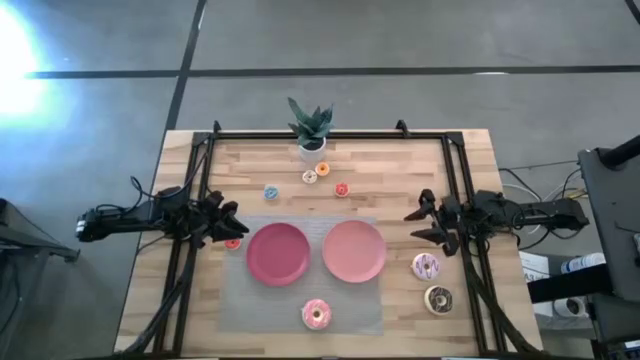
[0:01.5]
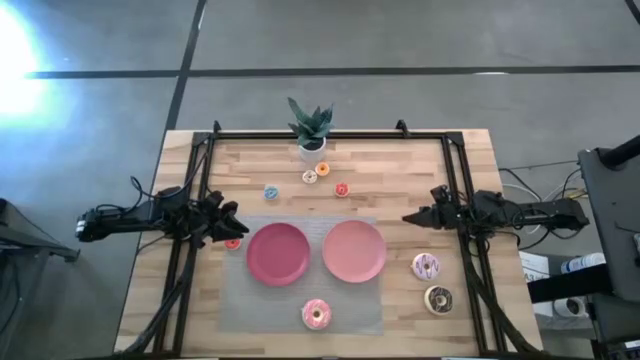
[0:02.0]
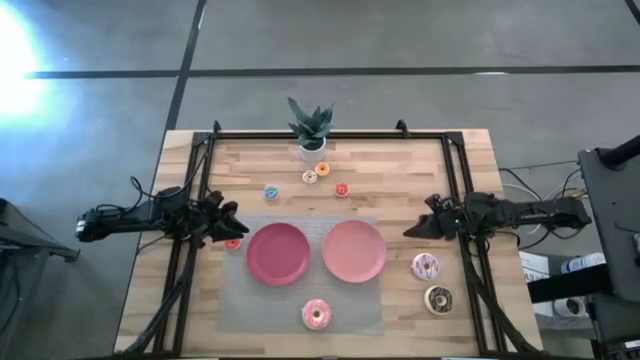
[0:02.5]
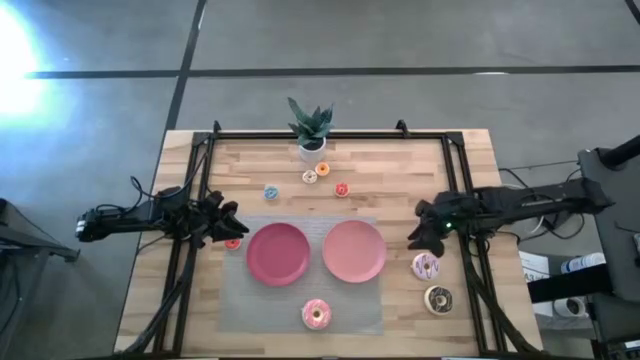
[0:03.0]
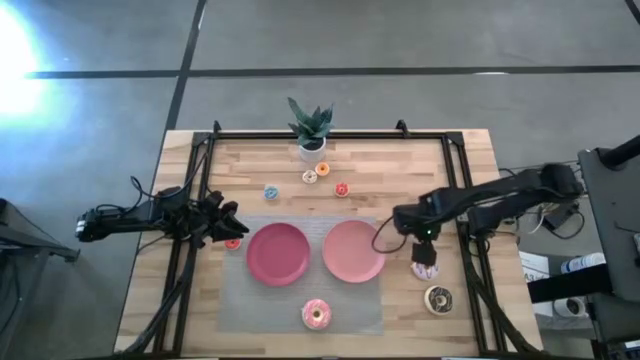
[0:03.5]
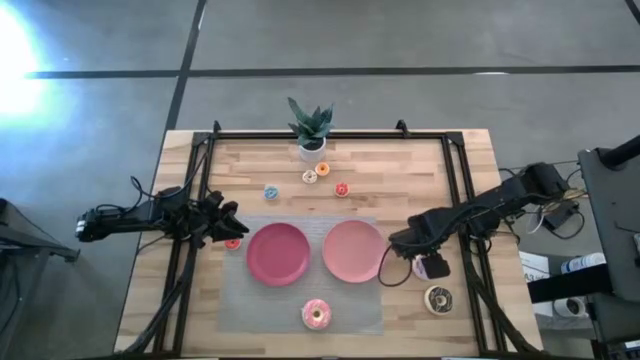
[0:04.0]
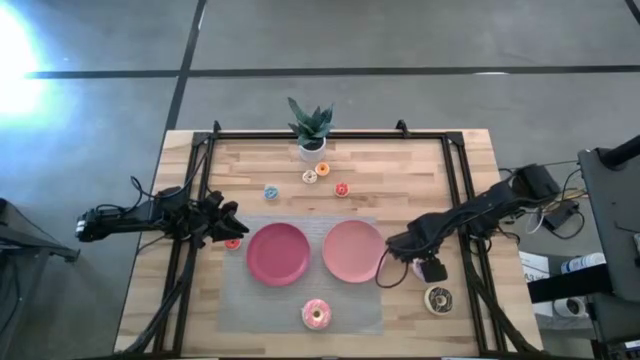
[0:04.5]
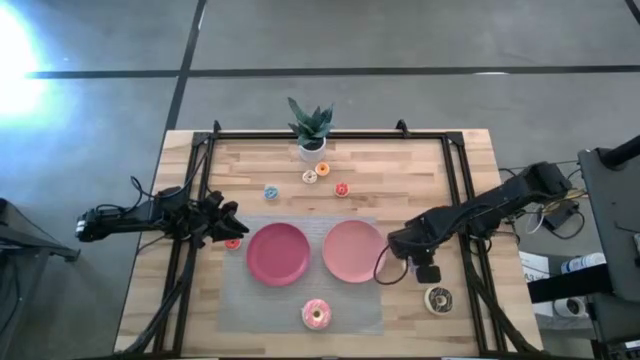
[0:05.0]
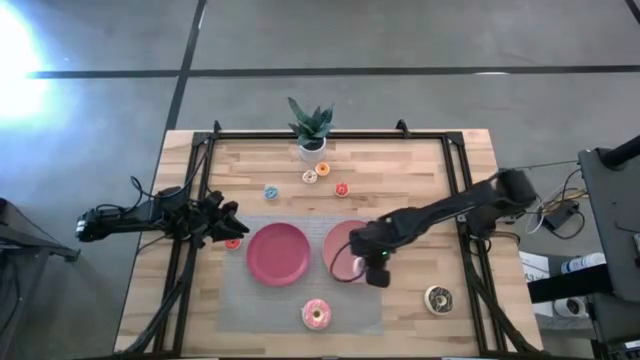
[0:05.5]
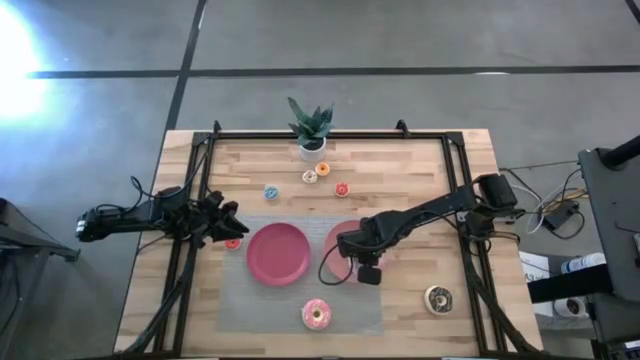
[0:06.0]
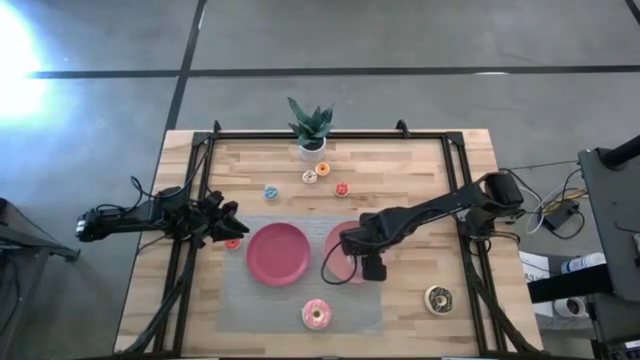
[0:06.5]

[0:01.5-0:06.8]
Task: Pick & Place donuts
Put the big purple donut on the light pink plate

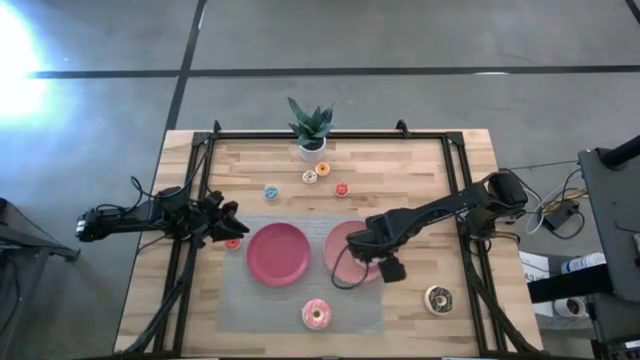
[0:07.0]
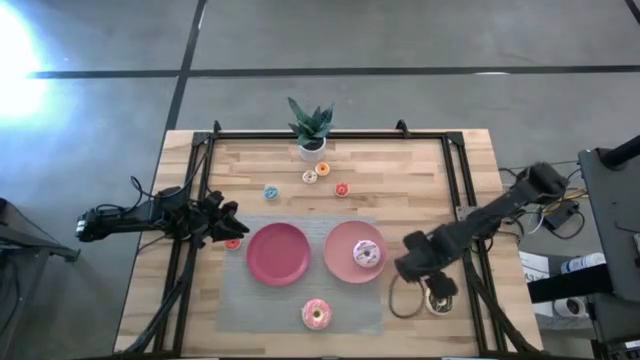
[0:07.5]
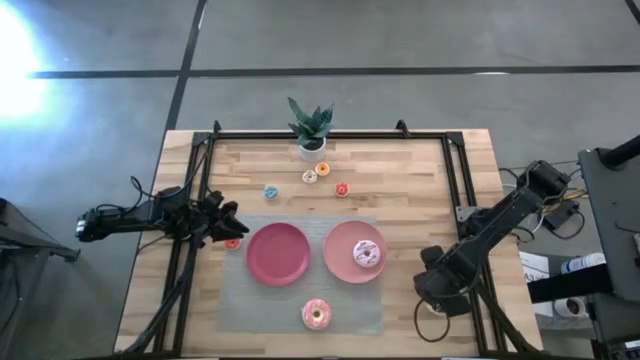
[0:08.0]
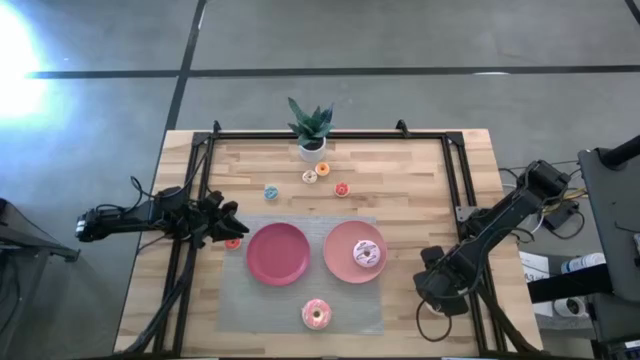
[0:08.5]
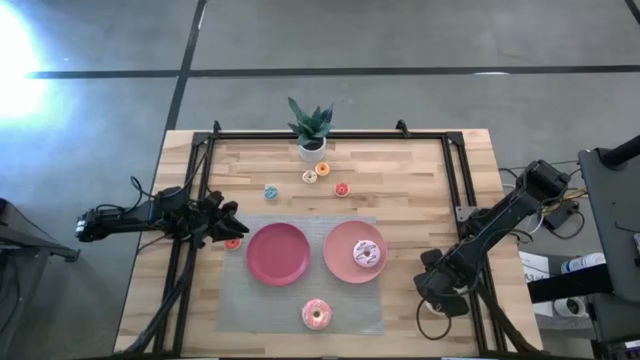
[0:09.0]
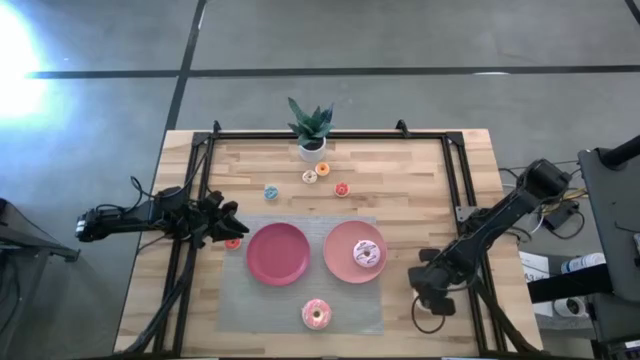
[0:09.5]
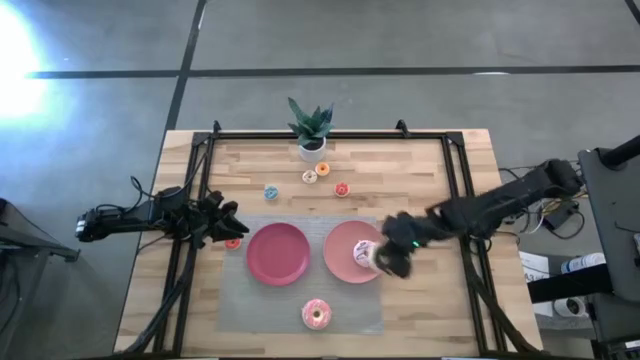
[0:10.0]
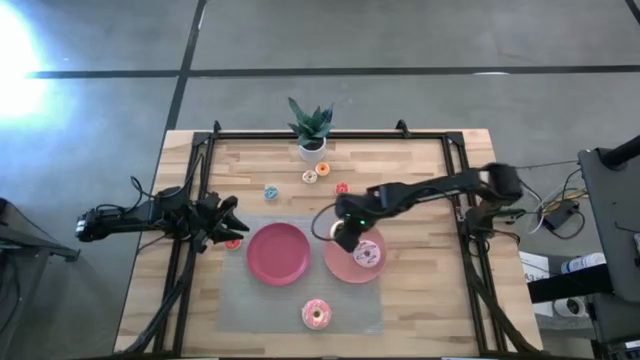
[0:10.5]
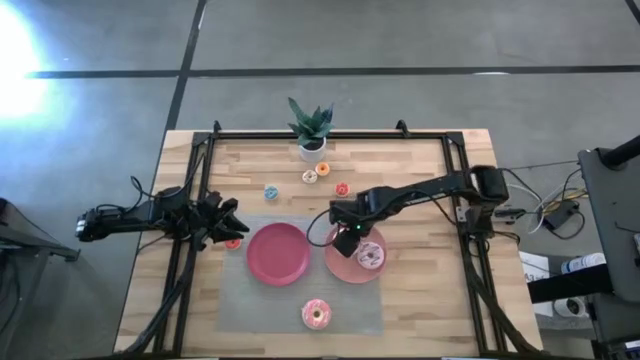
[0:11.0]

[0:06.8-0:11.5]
Put the big black donut on the light pink plate

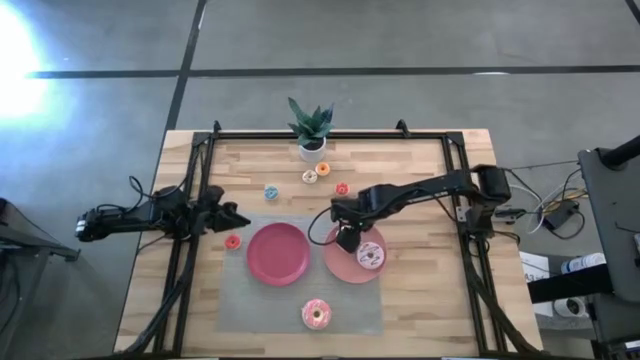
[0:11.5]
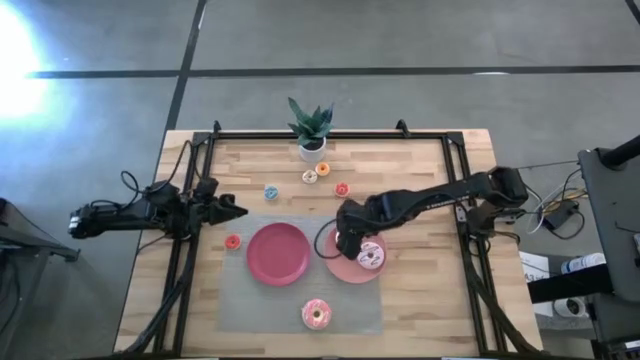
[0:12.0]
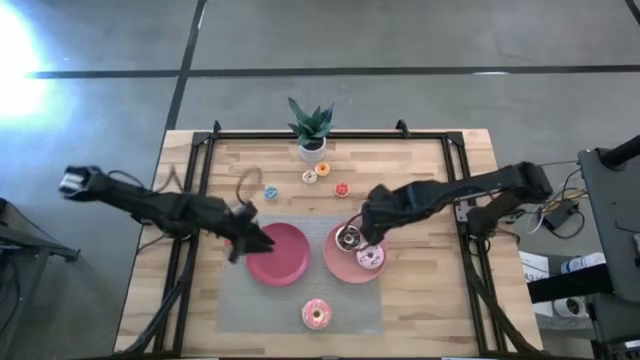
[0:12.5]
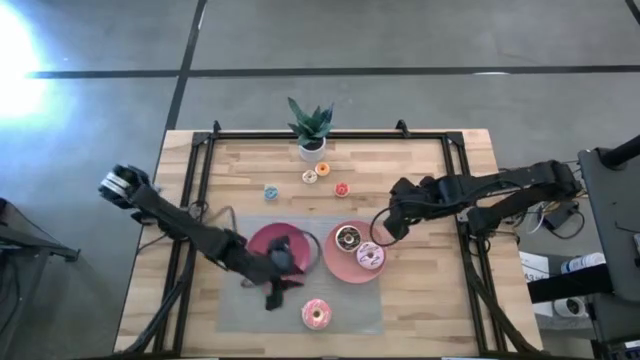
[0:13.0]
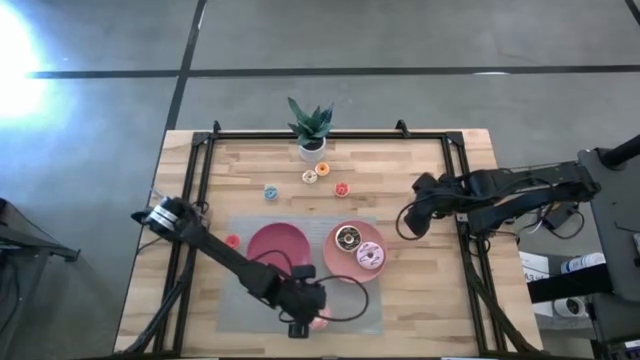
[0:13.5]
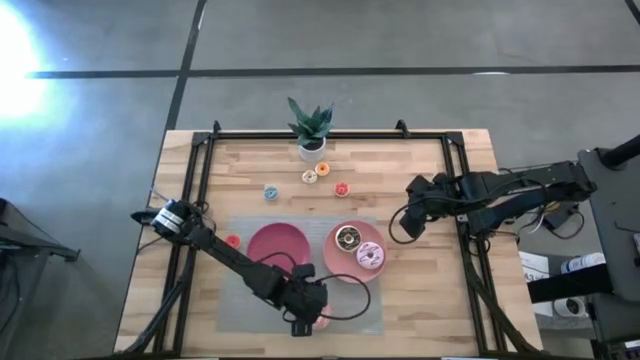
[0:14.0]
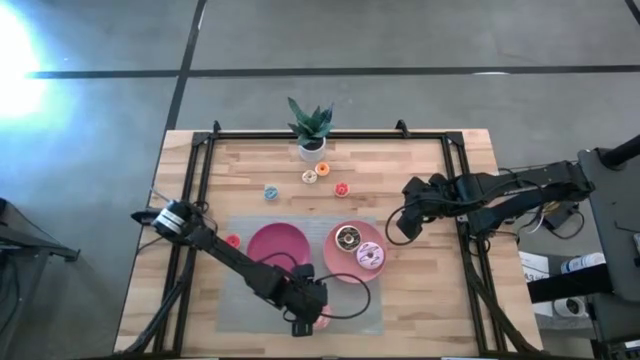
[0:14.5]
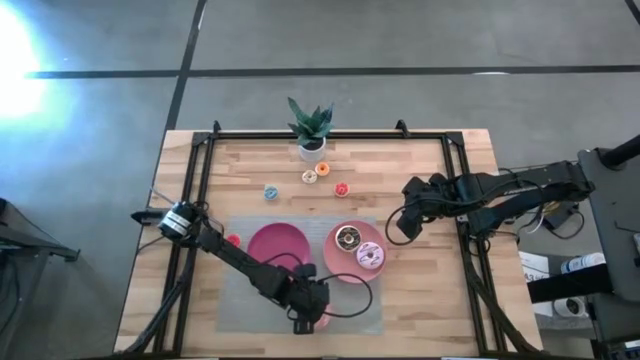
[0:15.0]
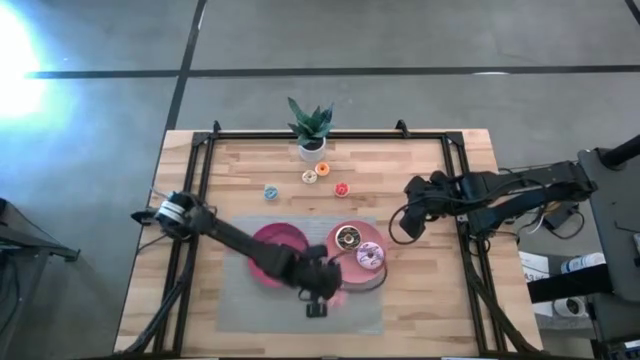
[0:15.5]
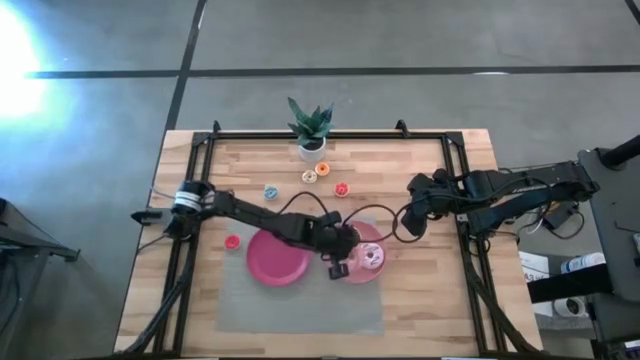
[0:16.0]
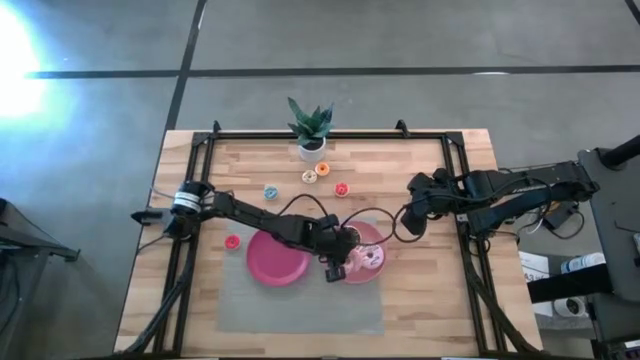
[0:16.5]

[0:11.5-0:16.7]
Put the big pink donut on the light pink plate

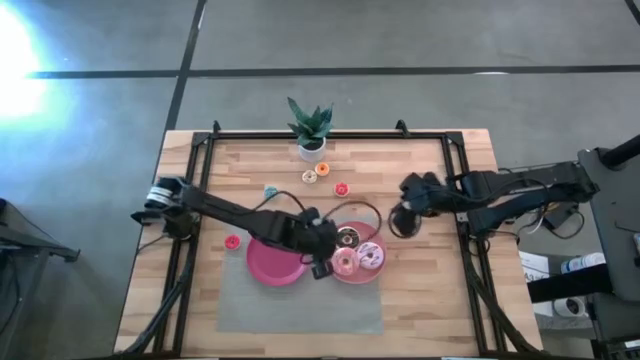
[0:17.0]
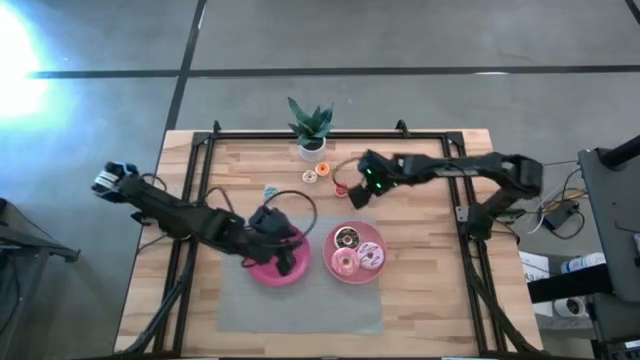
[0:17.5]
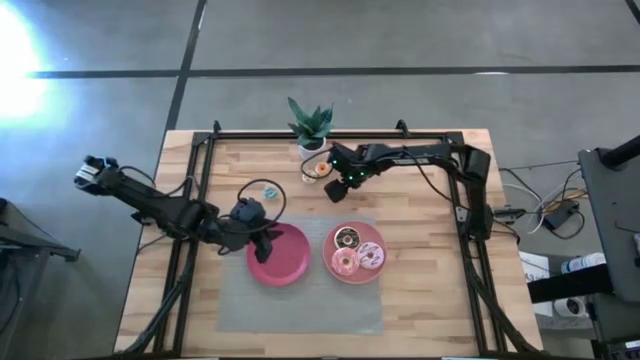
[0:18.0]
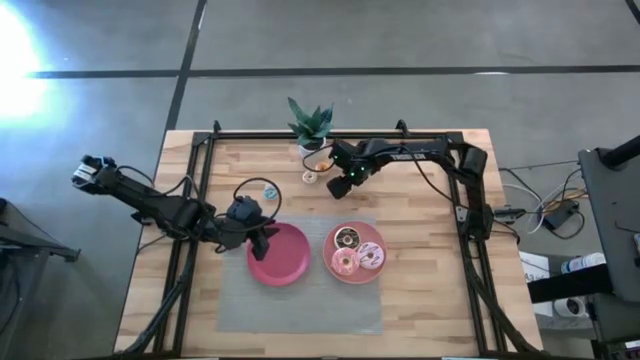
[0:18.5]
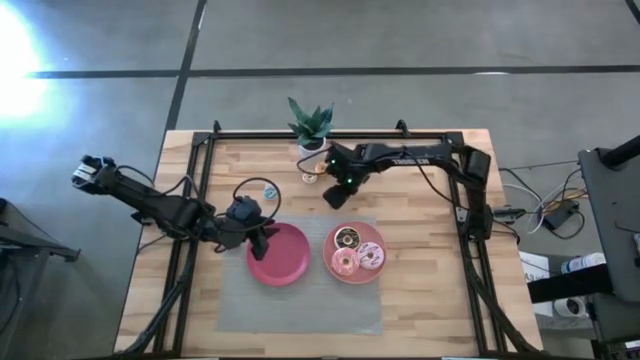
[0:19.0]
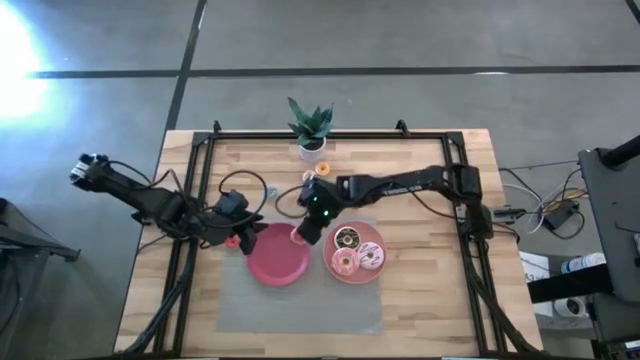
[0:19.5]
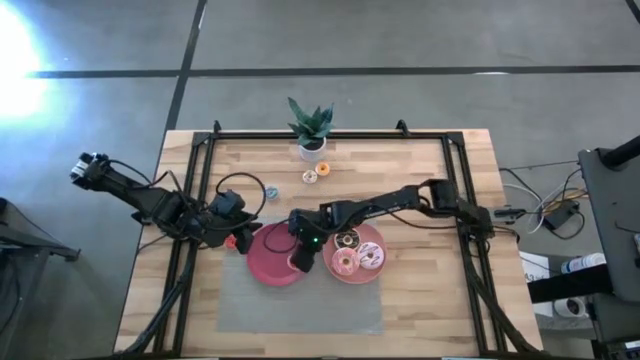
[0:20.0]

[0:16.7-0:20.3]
Put the small orange donut on the pink plate

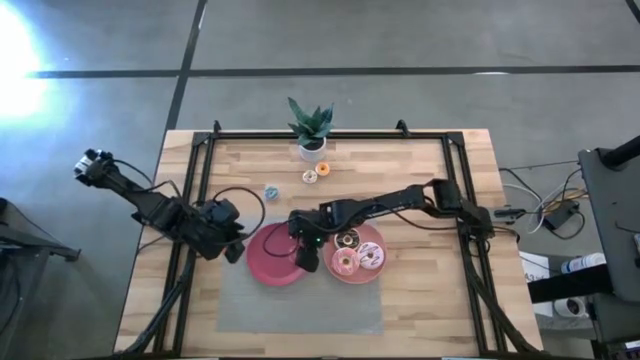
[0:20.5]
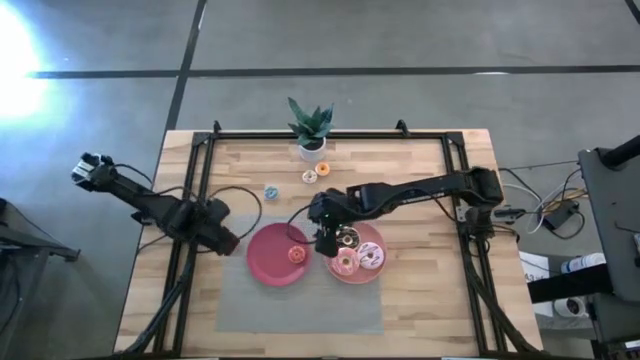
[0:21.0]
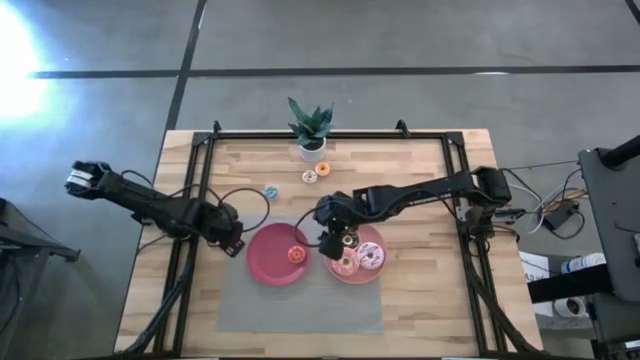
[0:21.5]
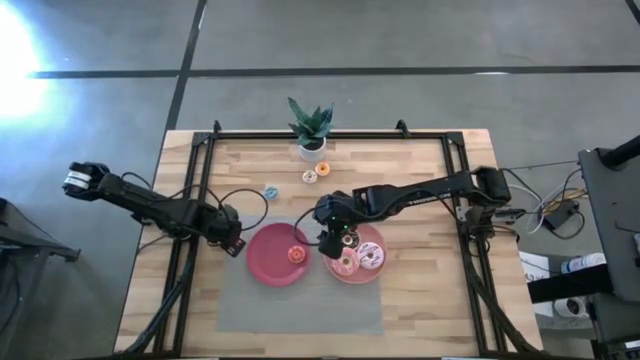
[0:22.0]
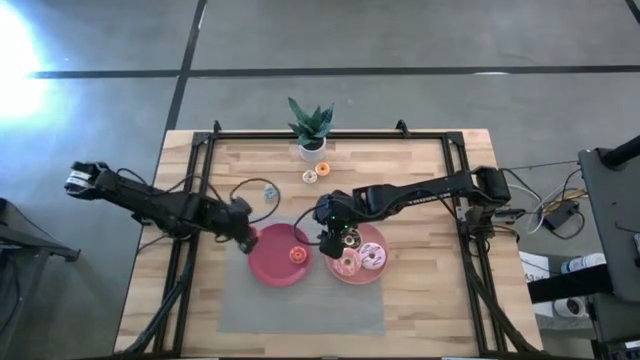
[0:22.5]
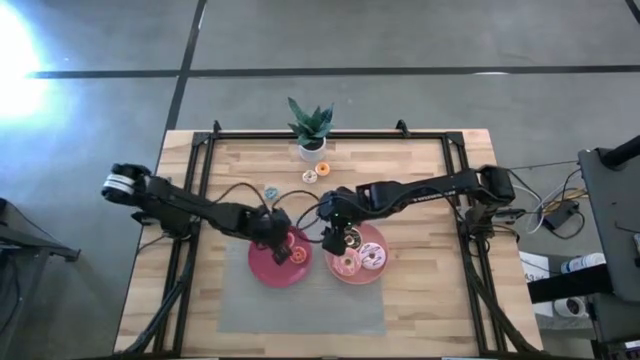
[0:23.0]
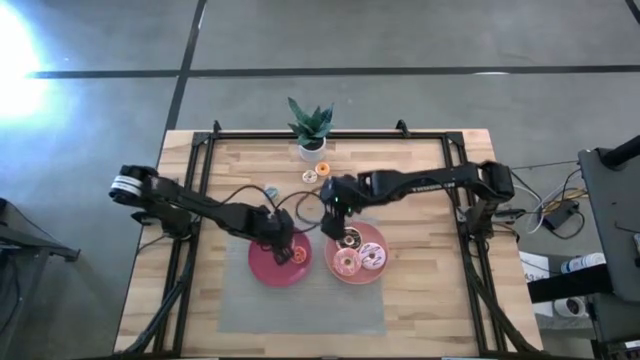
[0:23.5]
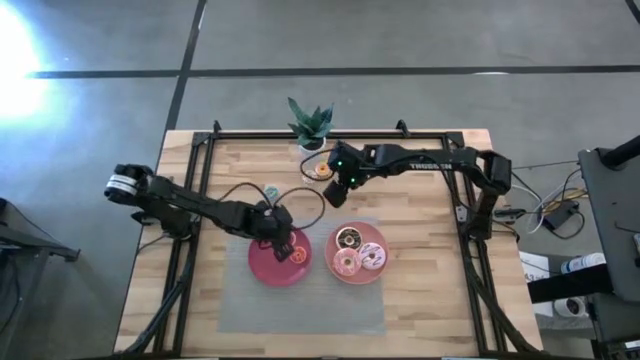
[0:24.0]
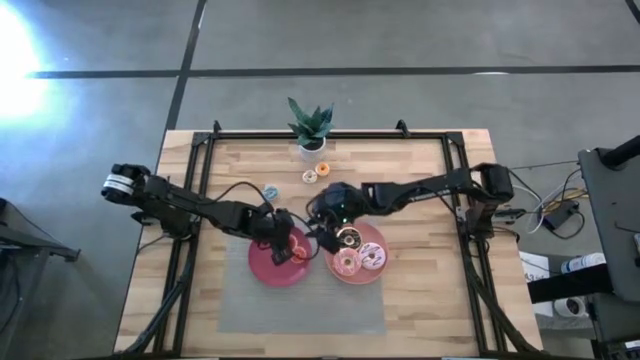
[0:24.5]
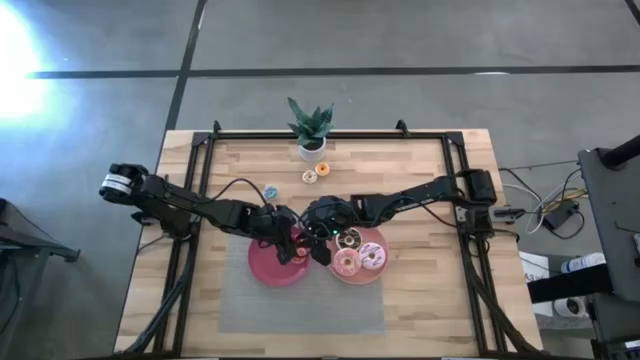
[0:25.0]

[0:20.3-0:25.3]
Put the small red donut on the pink plate
